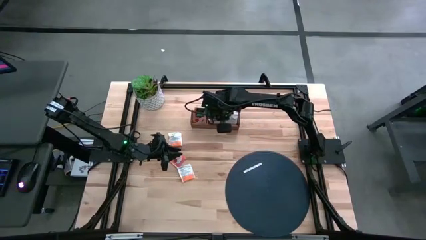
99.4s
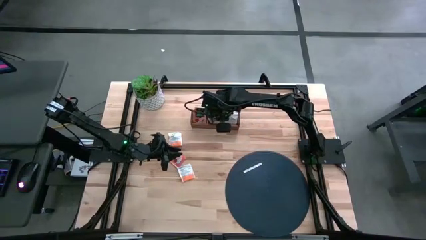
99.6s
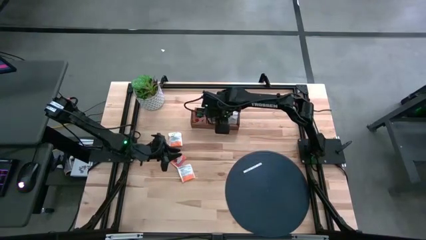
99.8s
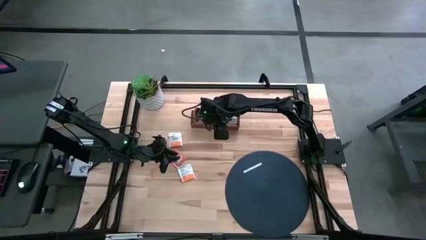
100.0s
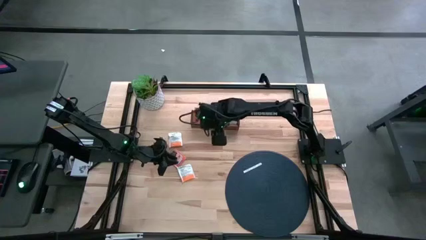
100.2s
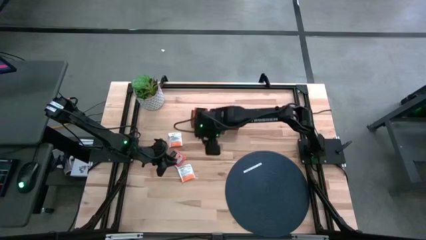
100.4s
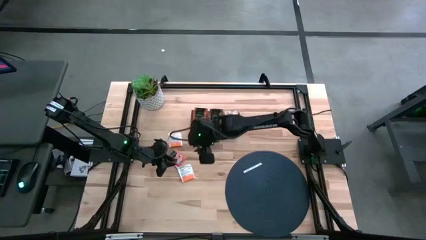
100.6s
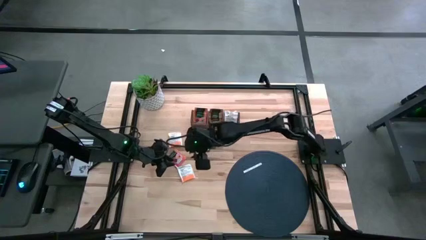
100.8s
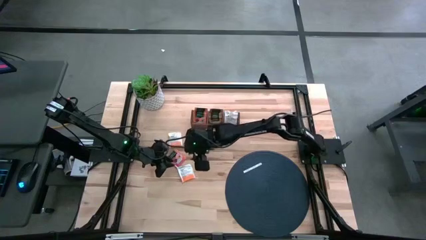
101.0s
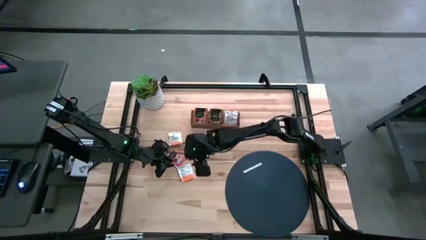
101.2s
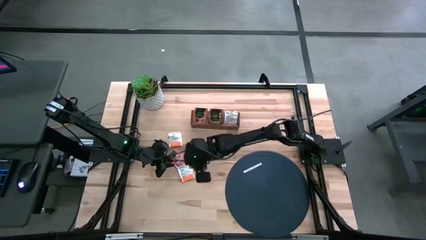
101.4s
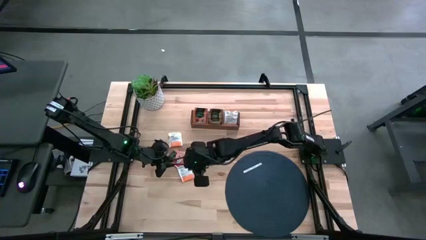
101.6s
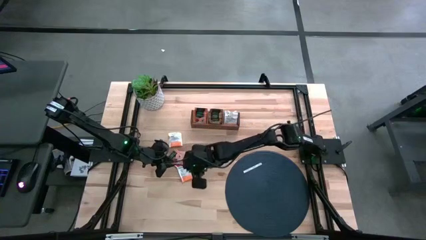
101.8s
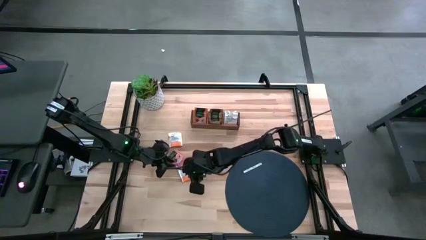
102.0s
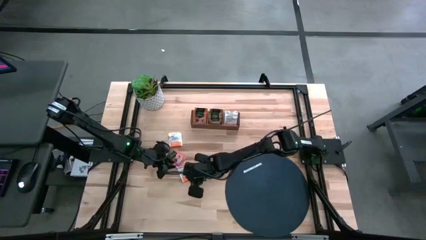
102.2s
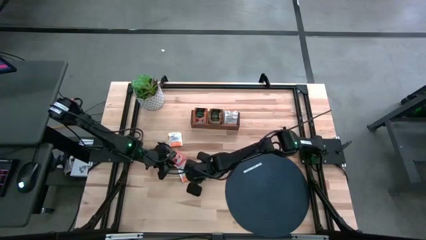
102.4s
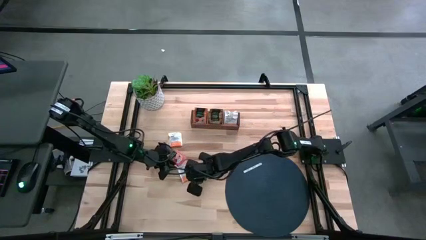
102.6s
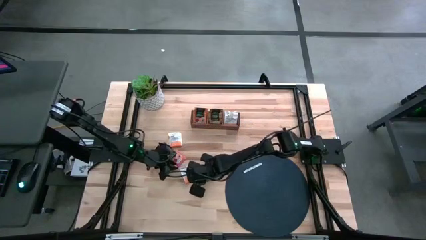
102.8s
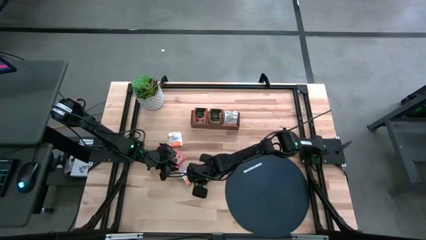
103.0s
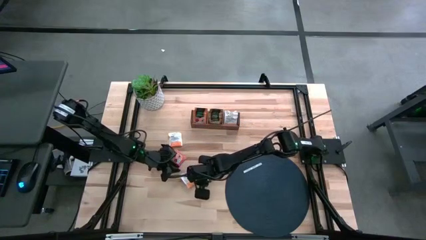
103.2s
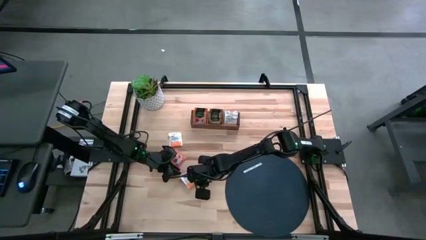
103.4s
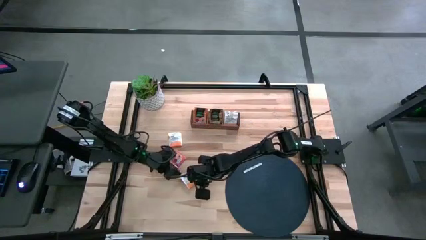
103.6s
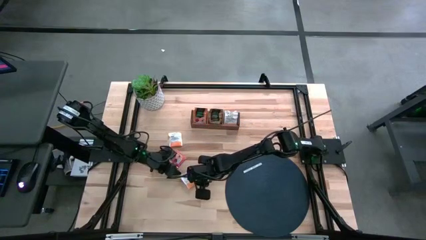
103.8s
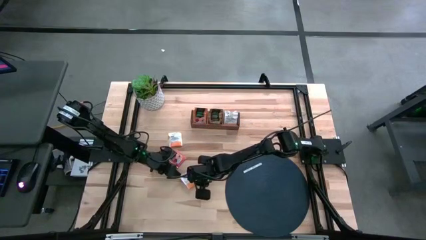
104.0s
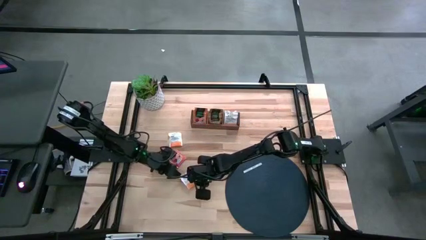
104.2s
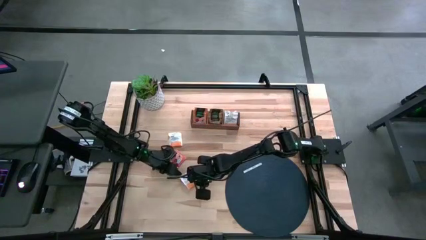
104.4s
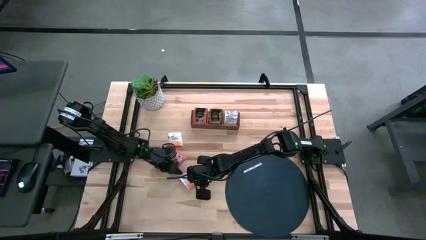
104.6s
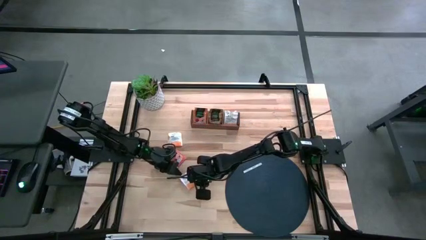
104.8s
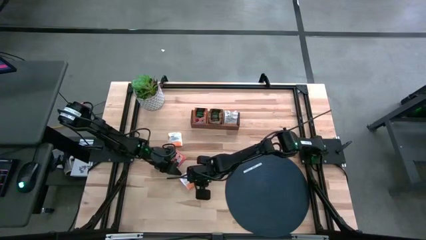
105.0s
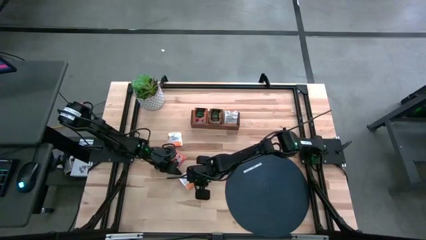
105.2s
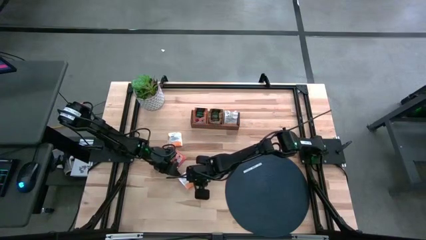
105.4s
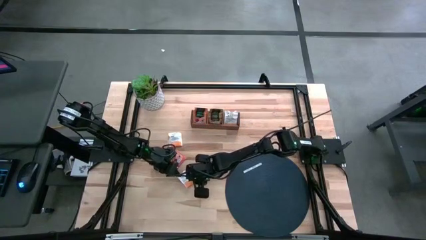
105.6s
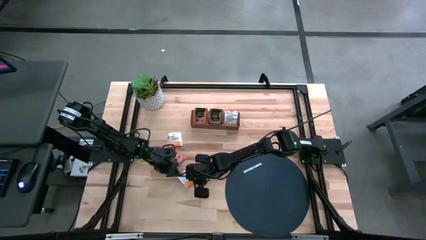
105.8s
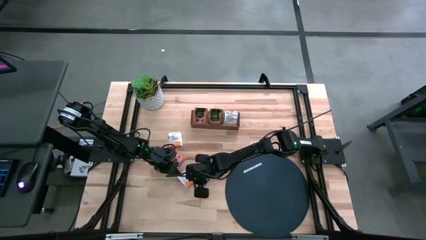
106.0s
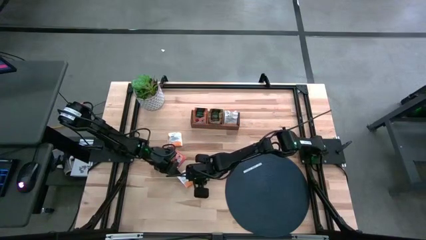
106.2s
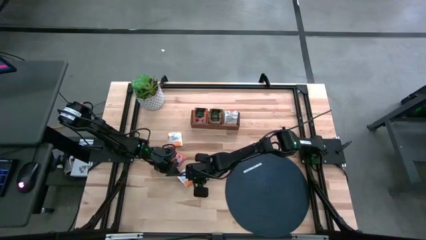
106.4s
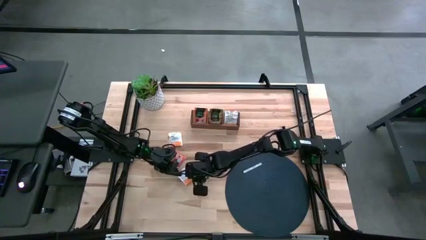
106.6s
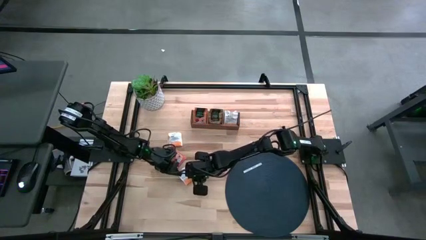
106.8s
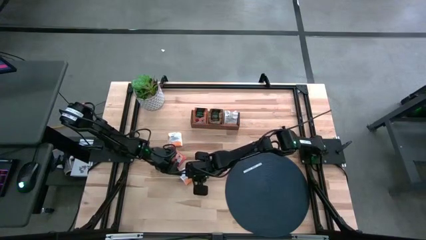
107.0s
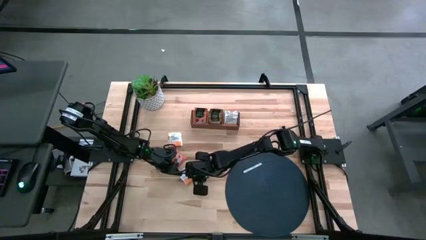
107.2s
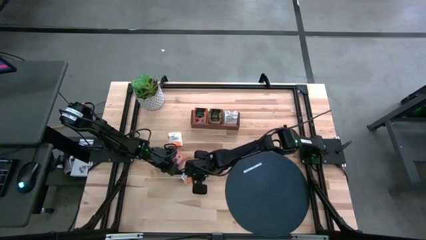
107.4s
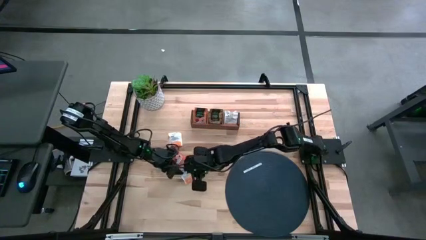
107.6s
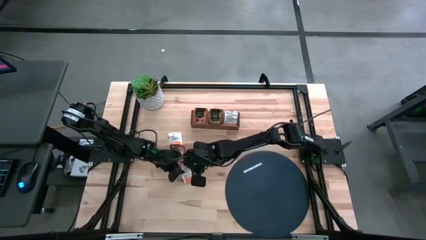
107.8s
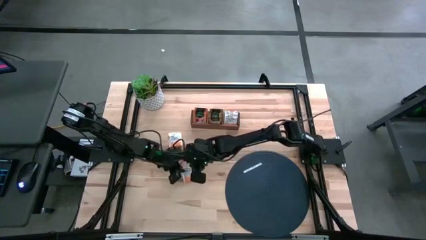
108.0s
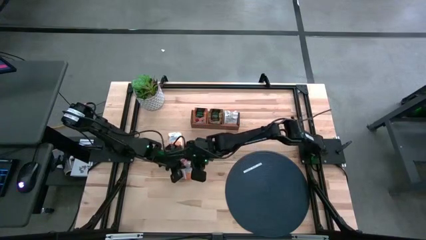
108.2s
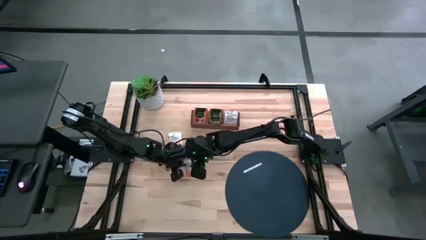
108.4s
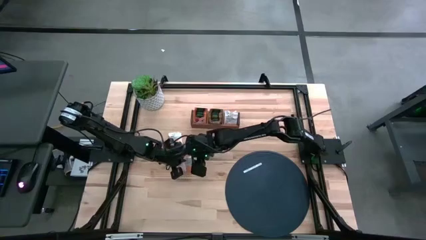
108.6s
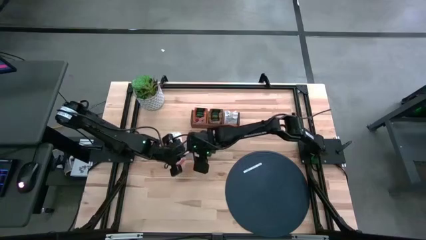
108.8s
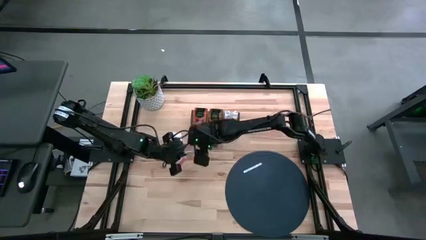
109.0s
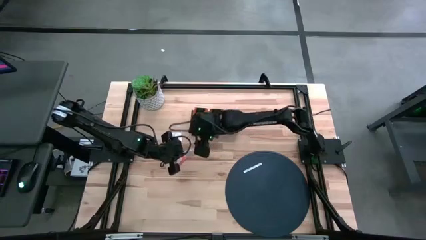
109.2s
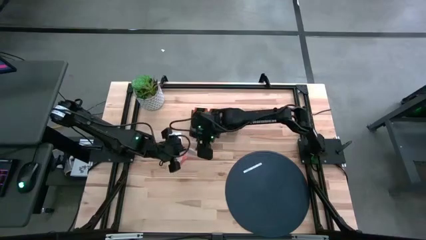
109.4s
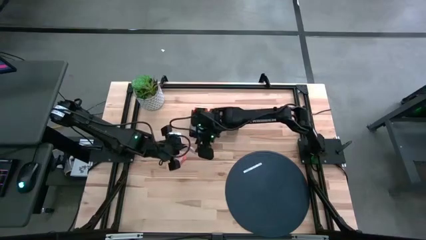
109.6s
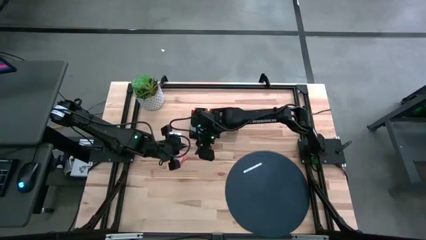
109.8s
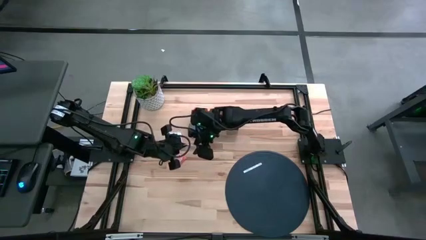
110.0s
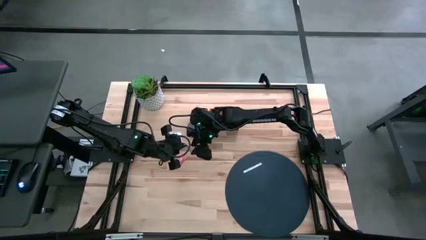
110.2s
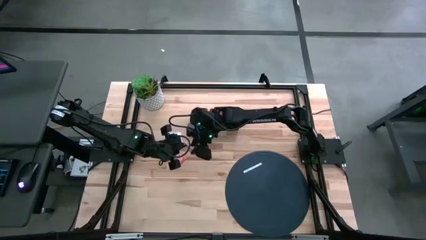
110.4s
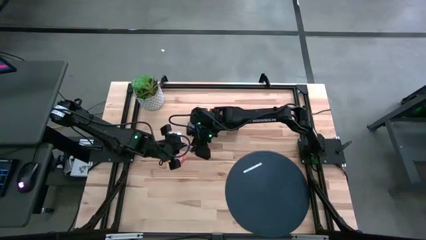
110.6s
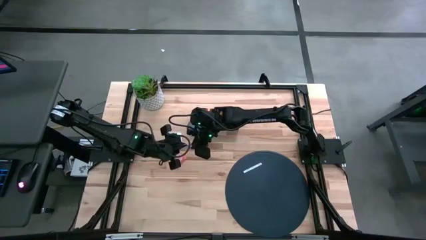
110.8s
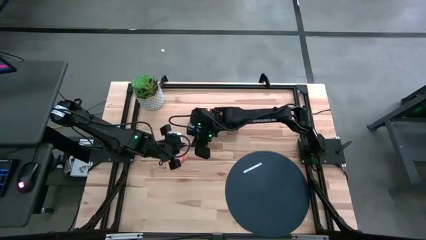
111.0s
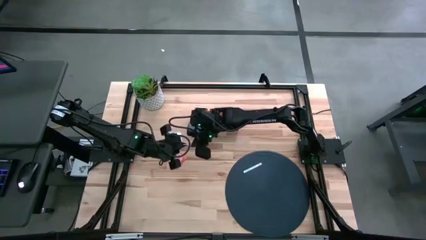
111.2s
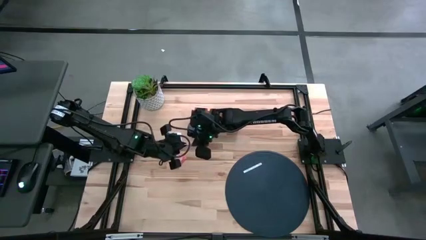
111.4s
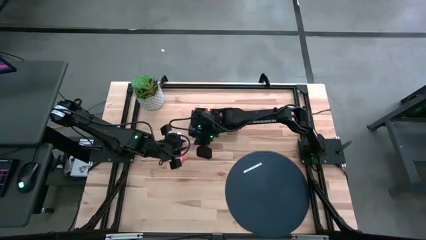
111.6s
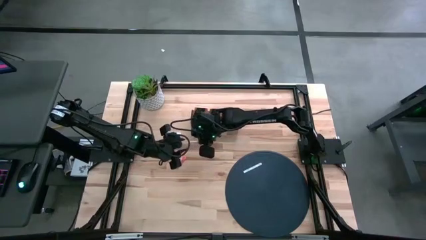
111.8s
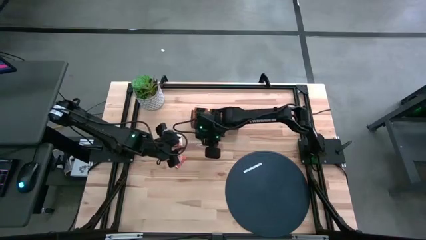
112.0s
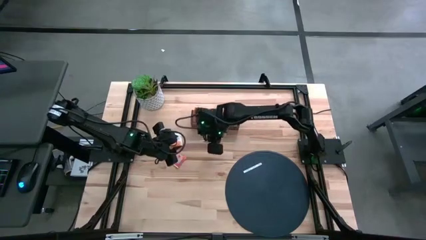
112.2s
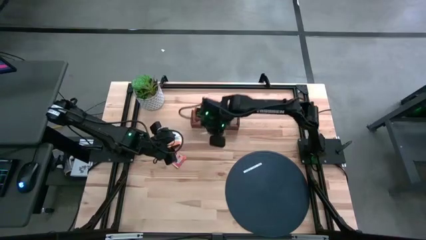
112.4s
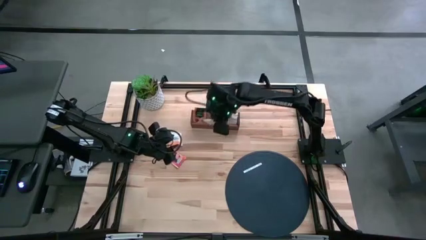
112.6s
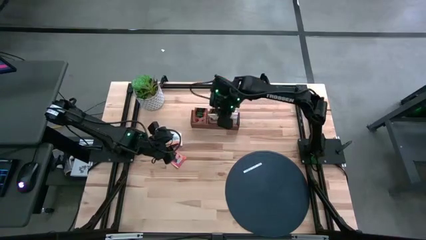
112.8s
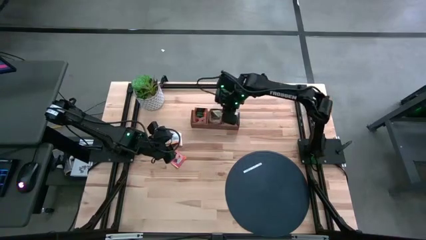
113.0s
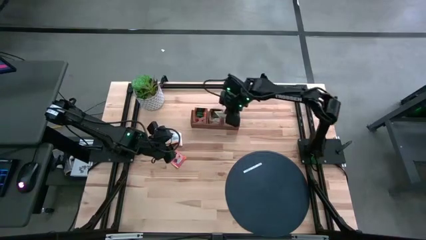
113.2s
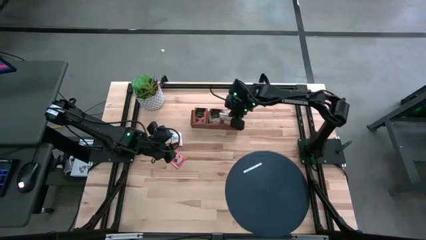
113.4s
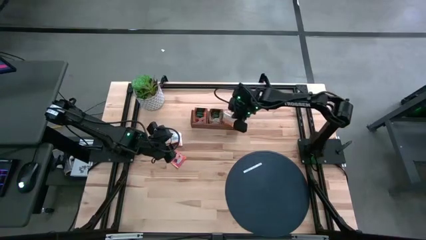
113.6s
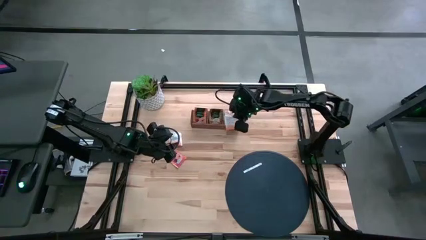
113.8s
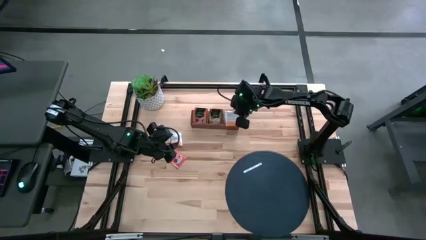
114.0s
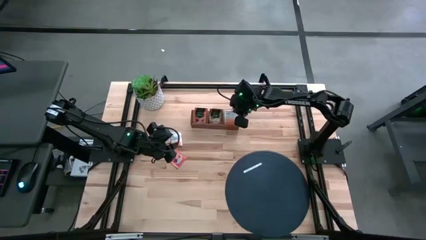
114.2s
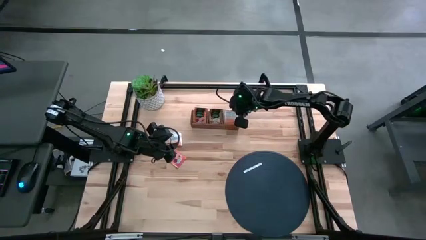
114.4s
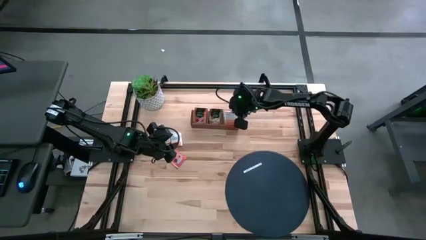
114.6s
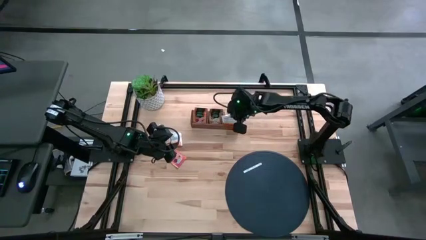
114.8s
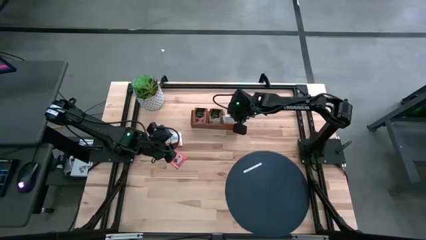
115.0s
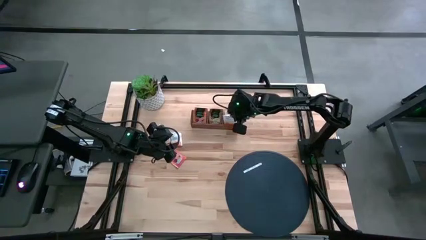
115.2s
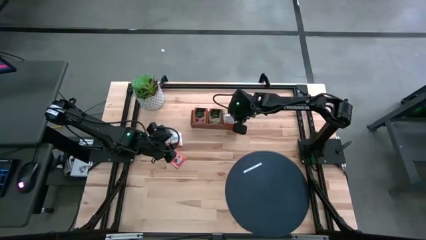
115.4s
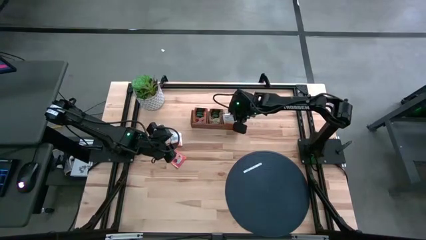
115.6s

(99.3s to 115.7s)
Task: Pick & Place Tea
Put the white orange tea sachet into the right section of the wooden organizer
